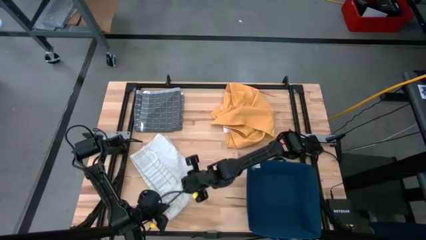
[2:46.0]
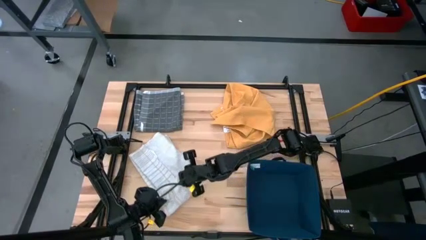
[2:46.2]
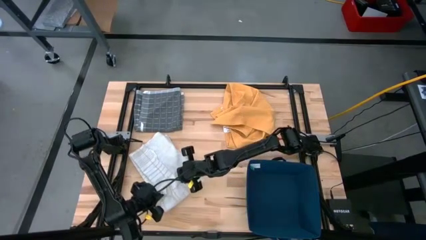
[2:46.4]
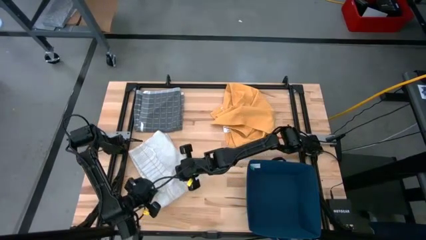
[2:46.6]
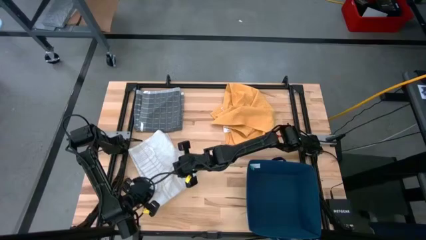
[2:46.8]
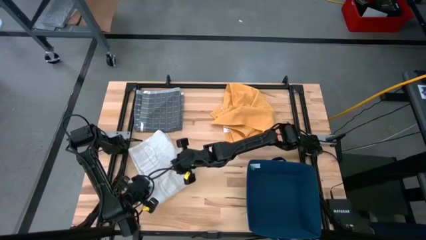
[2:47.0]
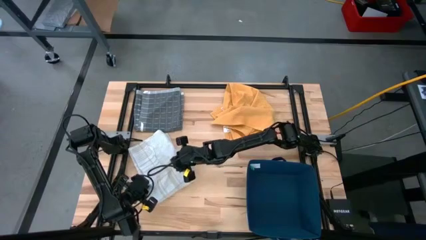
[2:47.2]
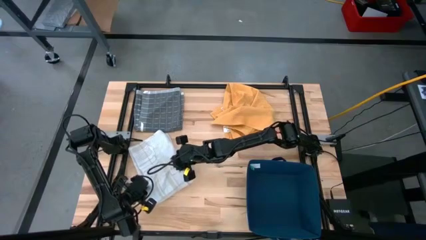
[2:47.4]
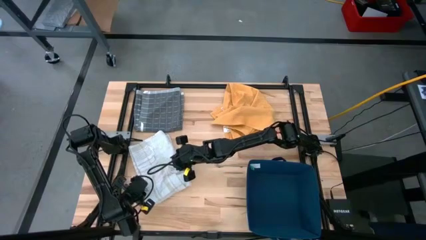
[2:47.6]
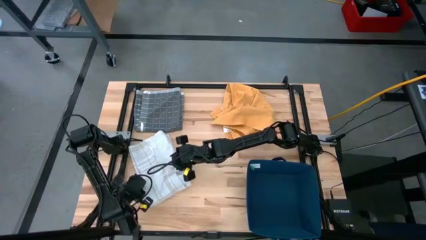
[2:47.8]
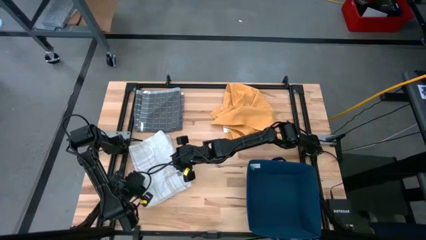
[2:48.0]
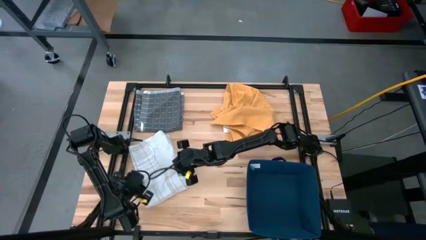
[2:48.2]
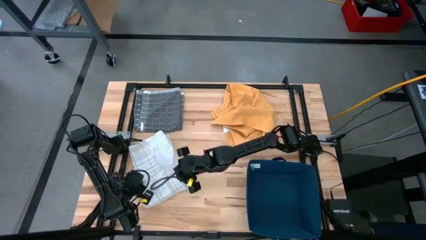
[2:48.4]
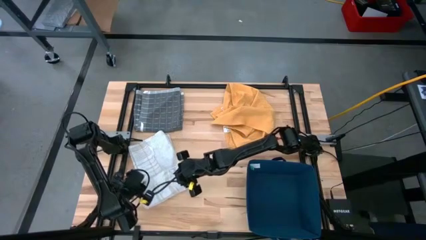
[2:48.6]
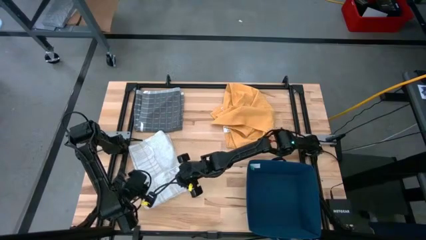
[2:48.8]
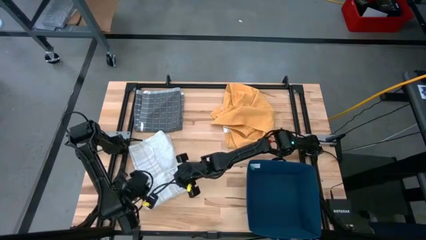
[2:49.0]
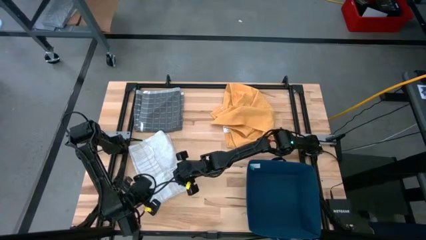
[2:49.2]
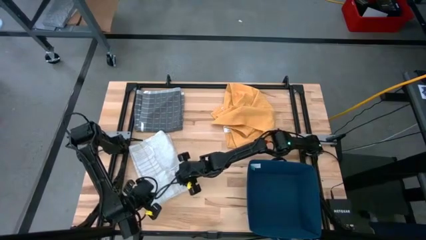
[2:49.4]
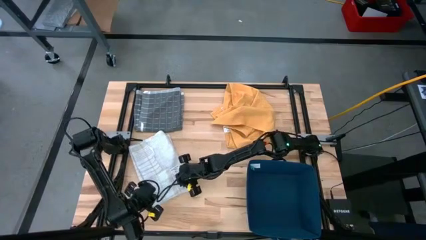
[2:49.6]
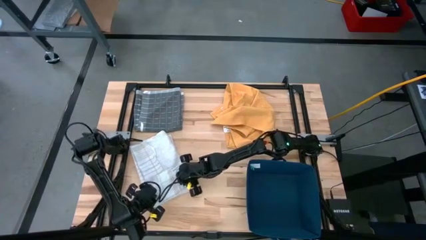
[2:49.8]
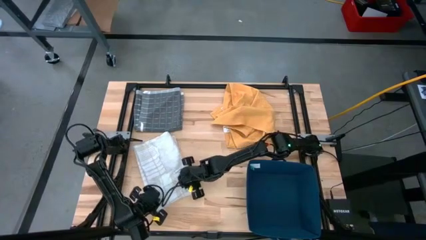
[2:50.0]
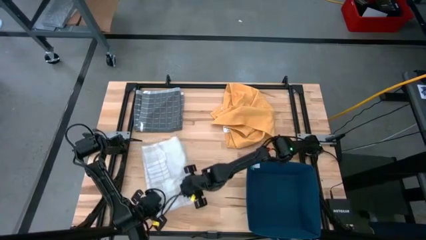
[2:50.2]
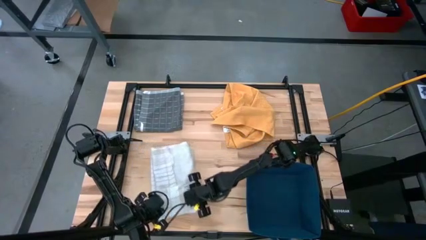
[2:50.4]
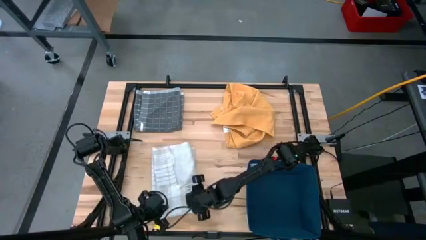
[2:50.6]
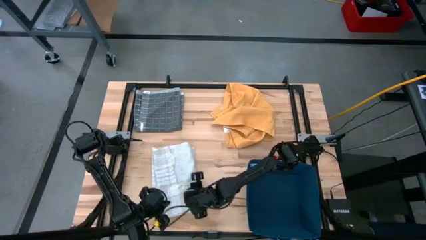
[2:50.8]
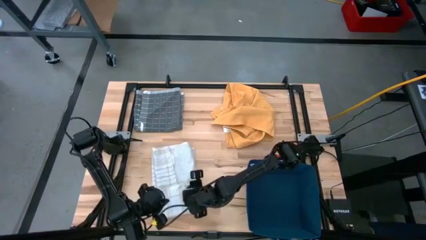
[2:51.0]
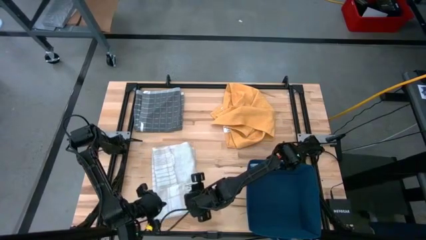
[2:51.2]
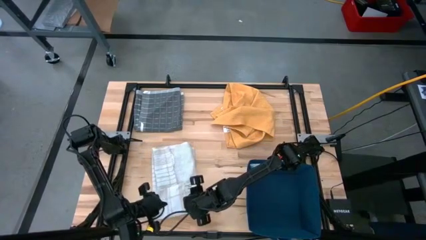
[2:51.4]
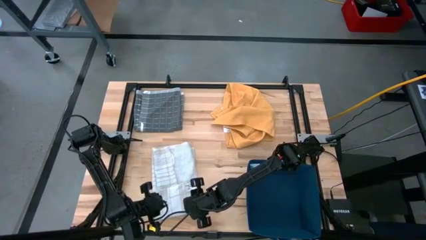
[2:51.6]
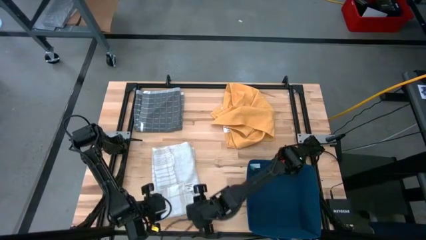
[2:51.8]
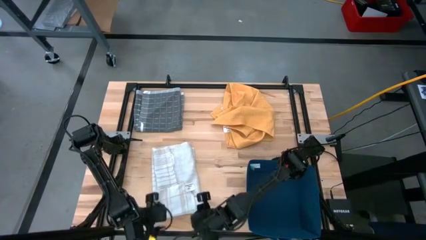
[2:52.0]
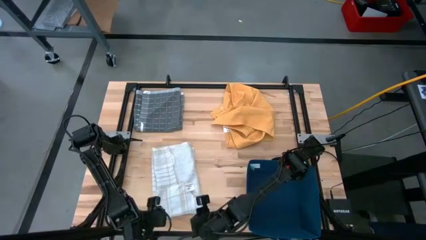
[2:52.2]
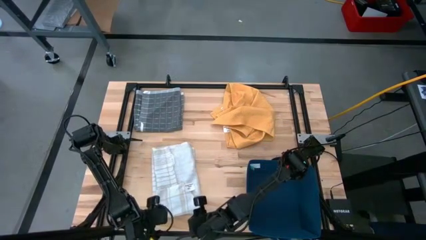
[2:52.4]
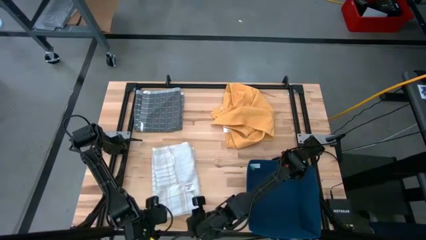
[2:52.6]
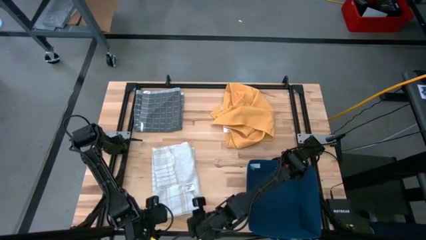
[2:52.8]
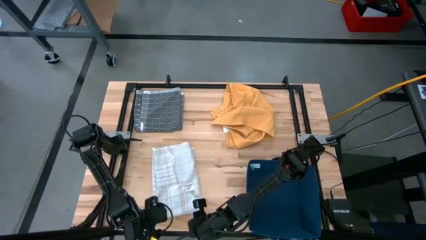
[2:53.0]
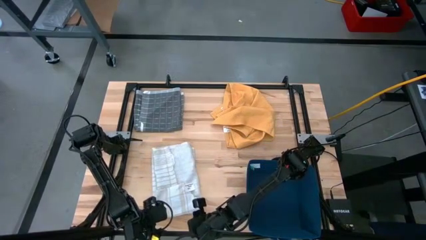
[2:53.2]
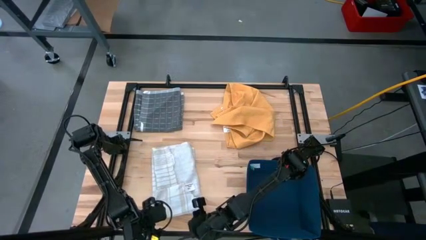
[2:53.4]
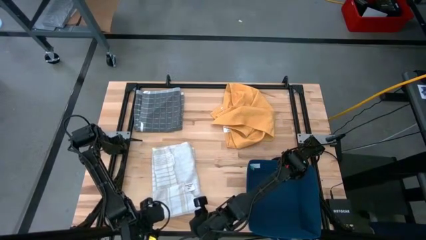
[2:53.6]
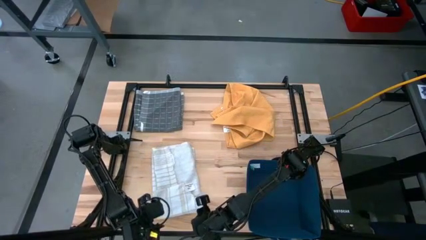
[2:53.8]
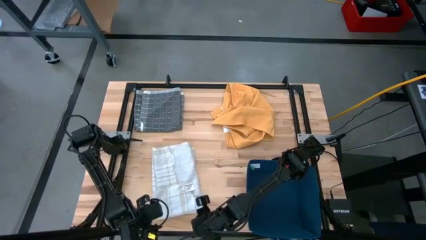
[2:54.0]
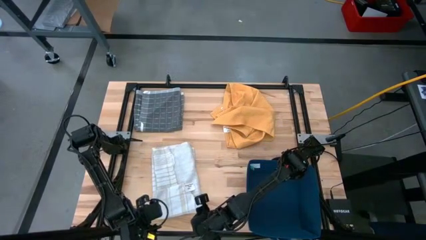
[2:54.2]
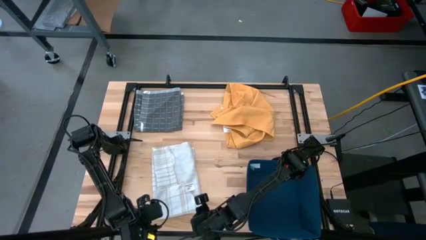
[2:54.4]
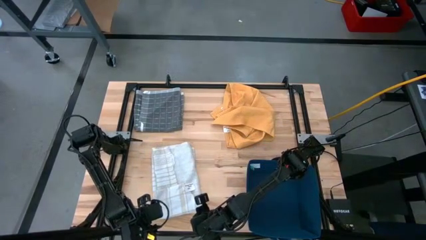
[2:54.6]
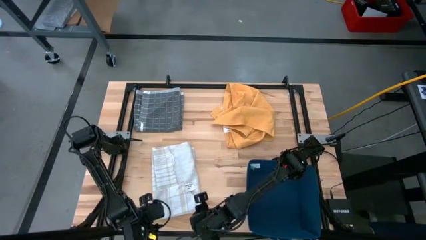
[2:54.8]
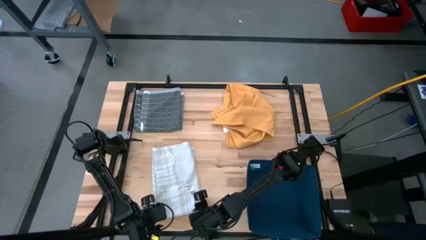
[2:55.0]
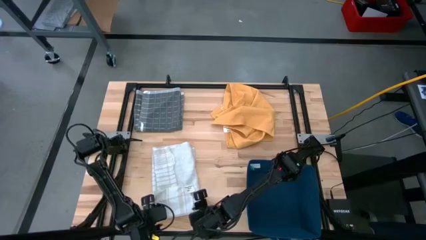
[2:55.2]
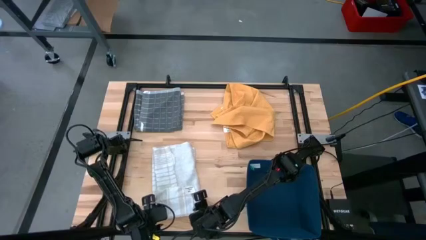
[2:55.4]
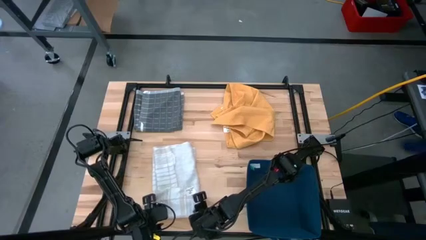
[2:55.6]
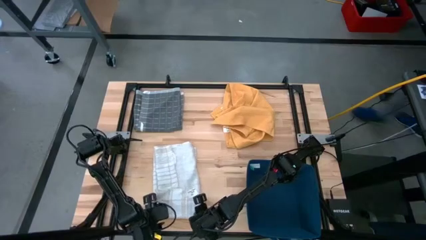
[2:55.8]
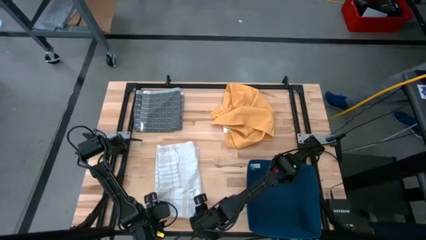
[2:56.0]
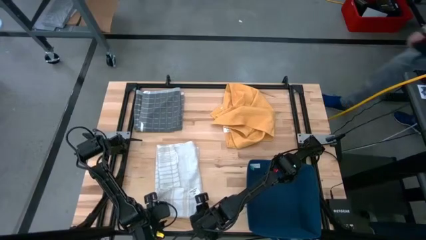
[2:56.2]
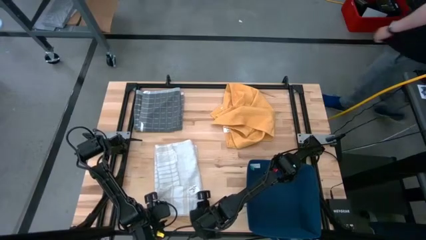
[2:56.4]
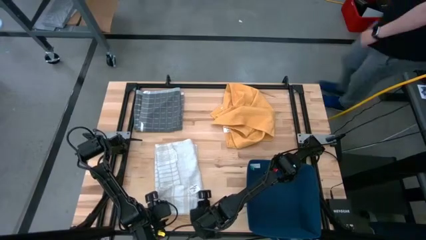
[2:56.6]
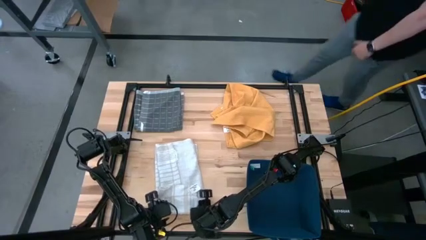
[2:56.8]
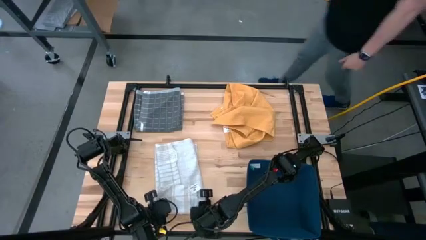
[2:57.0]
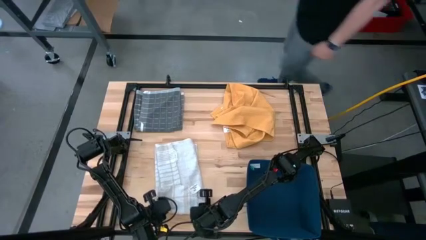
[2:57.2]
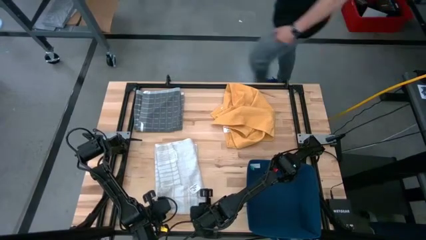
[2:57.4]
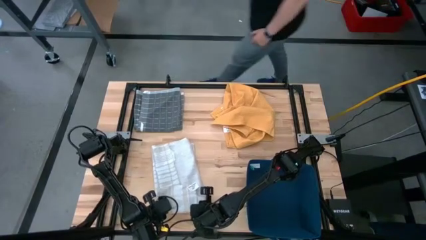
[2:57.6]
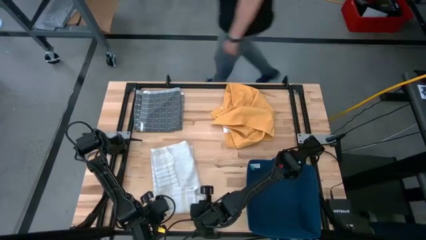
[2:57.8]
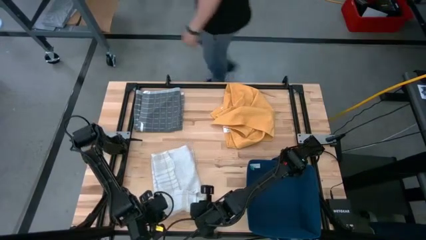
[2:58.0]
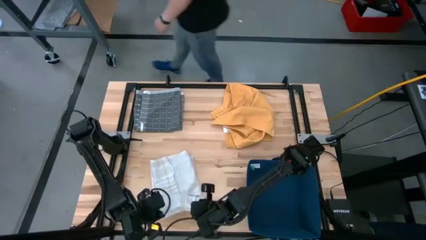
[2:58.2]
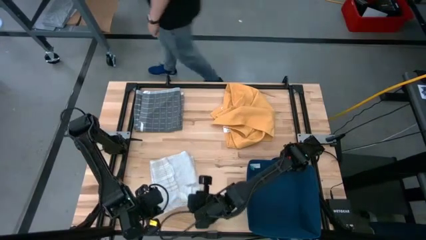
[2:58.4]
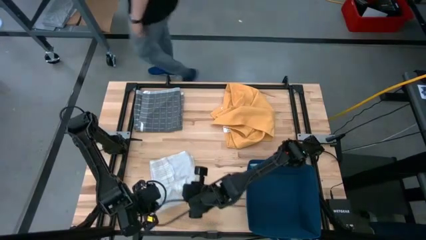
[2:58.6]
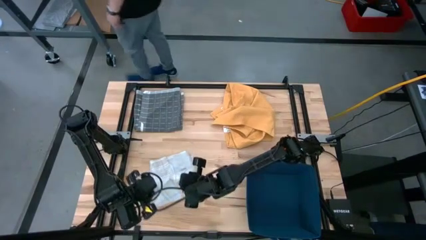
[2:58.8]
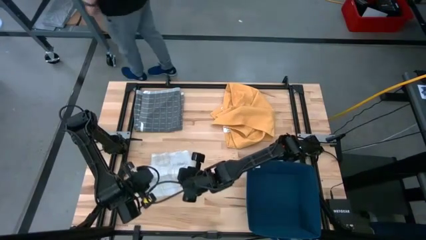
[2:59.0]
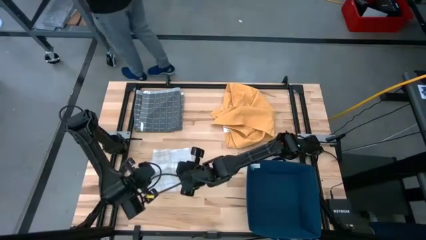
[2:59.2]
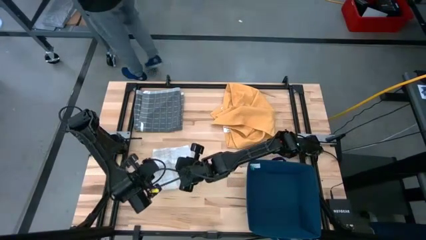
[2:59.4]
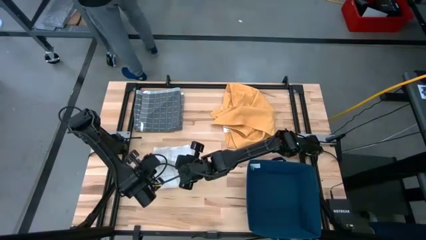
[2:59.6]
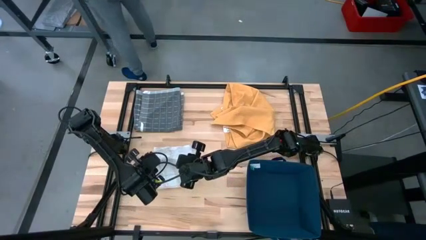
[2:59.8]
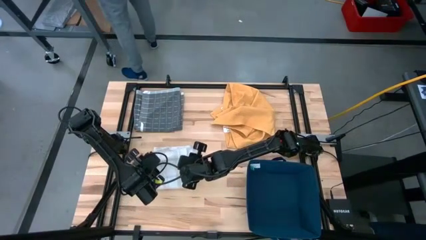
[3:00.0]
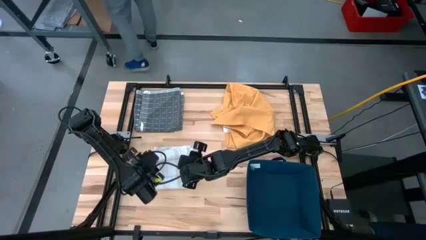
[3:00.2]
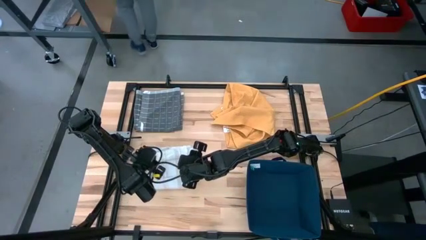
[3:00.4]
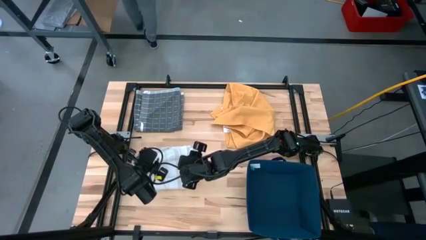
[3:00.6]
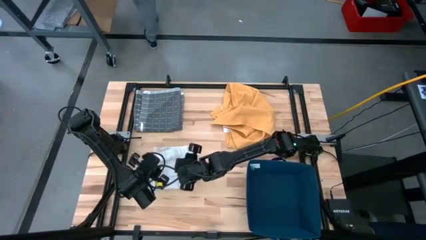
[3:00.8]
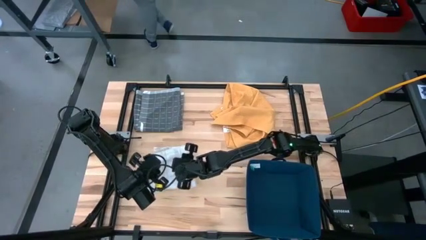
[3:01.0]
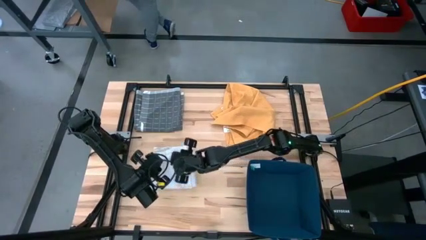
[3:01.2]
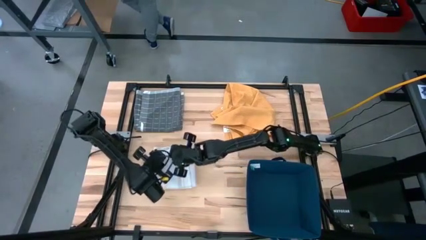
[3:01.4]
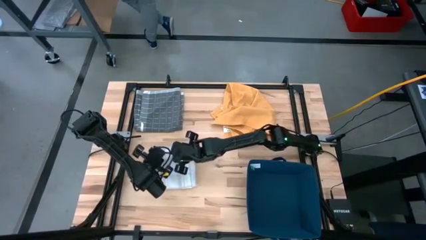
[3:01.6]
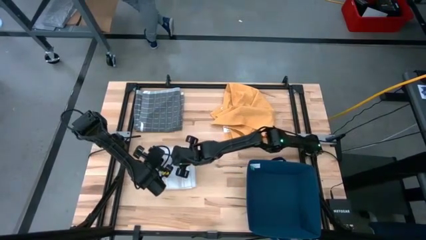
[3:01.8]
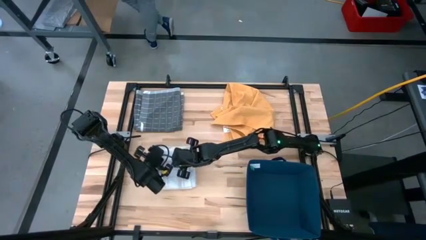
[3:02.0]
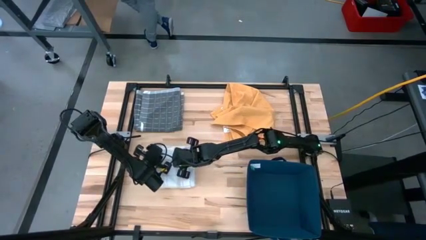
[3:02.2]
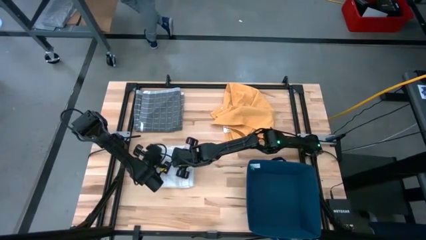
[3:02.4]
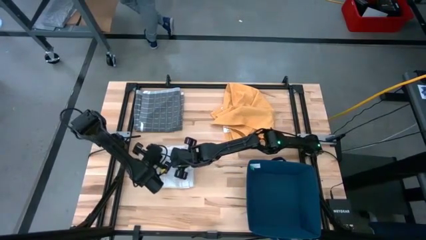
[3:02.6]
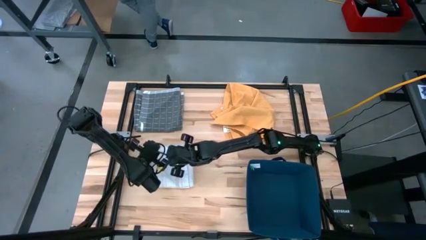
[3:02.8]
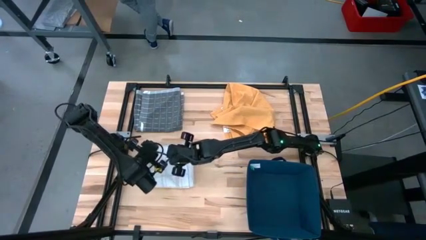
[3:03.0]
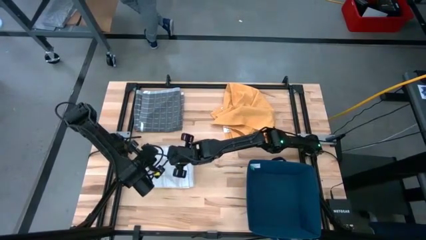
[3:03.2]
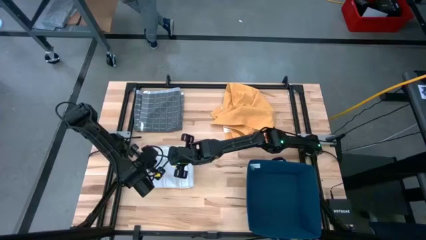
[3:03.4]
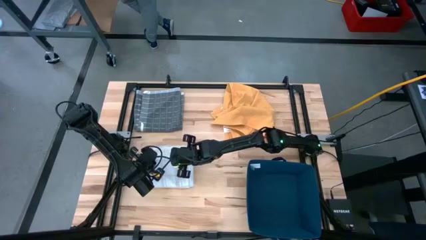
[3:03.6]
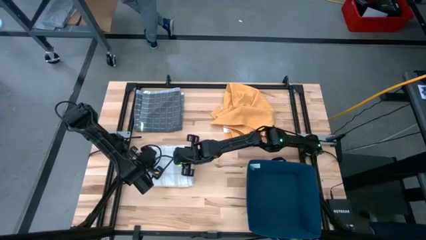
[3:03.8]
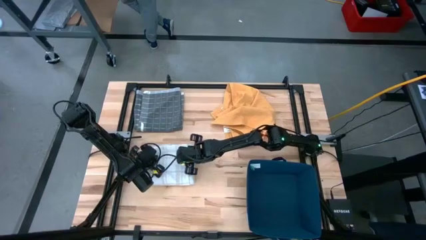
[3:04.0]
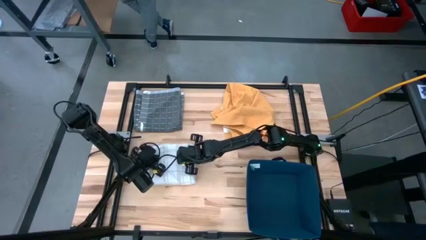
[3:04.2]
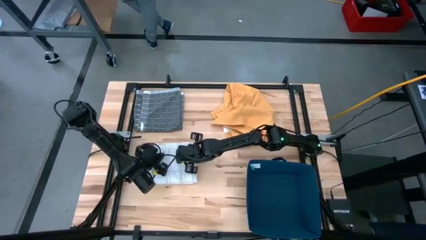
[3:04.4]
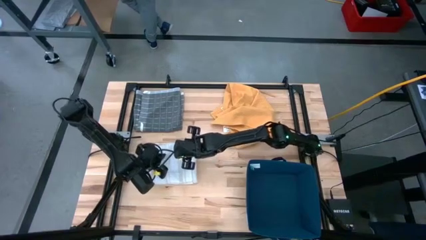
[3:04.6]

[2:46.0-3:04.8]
Task: Fold towel
Fold the white towel
